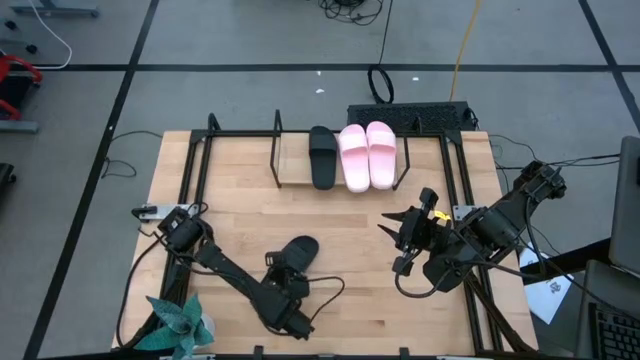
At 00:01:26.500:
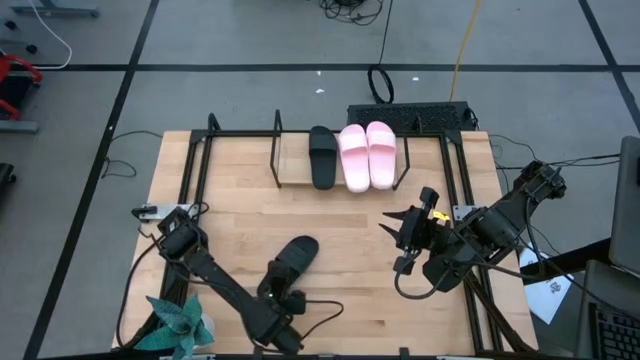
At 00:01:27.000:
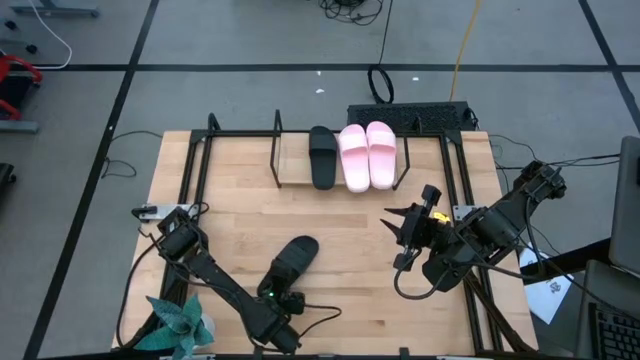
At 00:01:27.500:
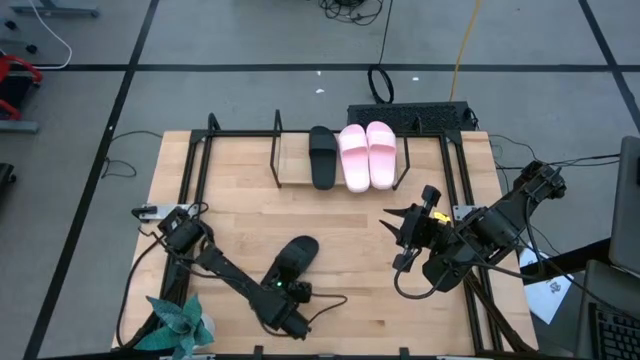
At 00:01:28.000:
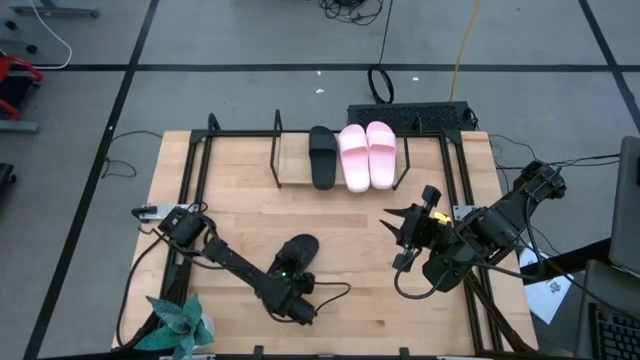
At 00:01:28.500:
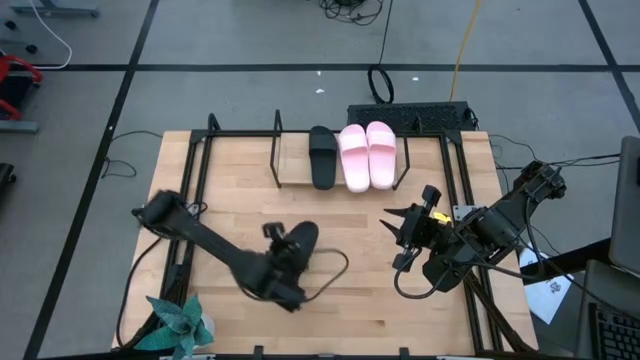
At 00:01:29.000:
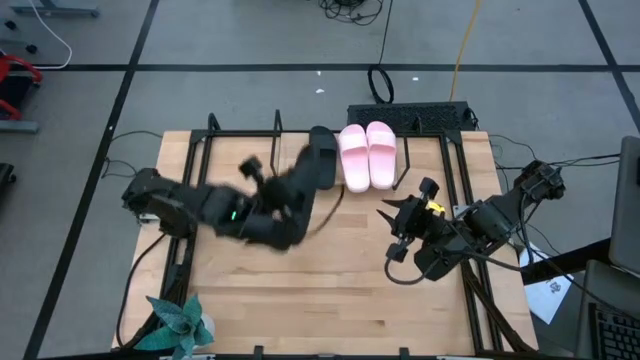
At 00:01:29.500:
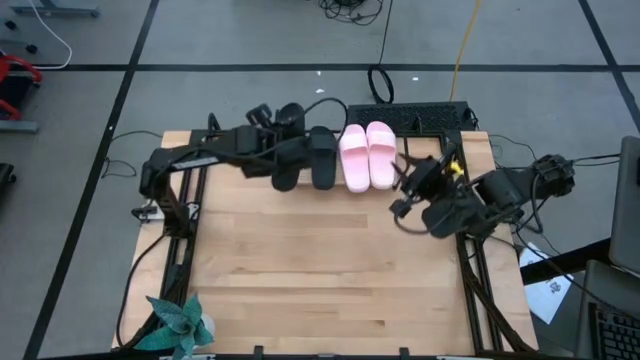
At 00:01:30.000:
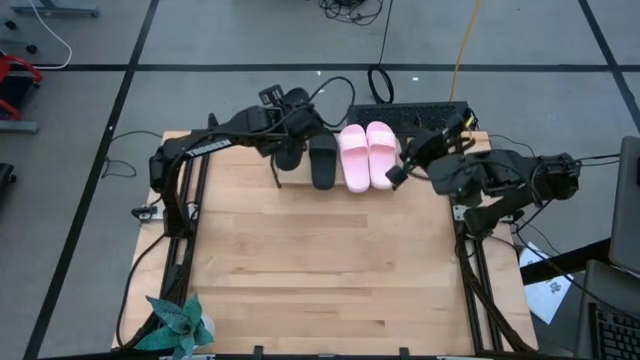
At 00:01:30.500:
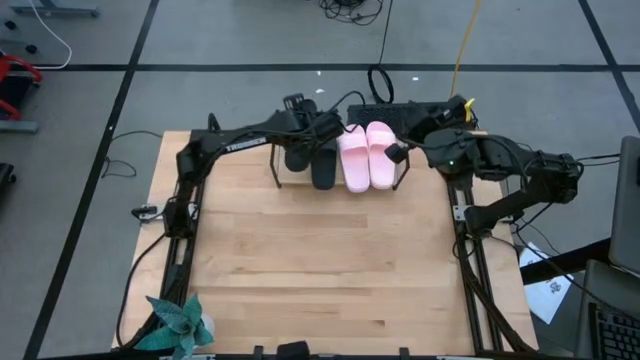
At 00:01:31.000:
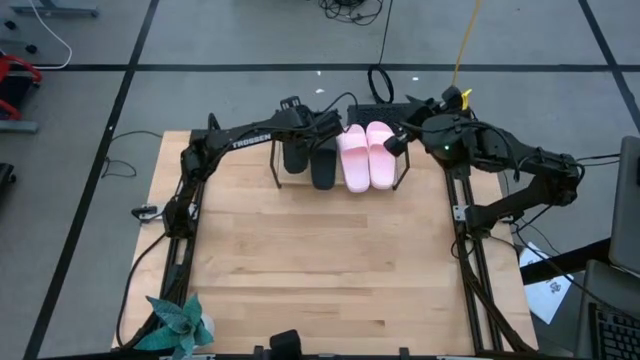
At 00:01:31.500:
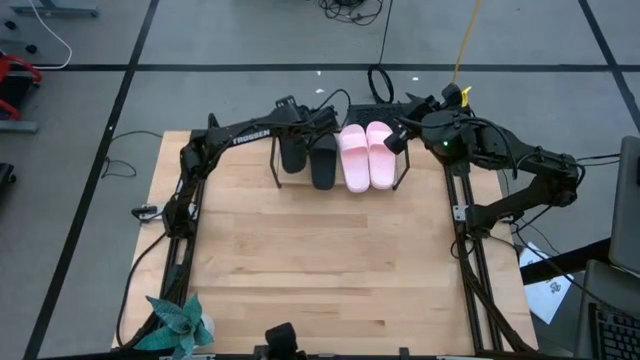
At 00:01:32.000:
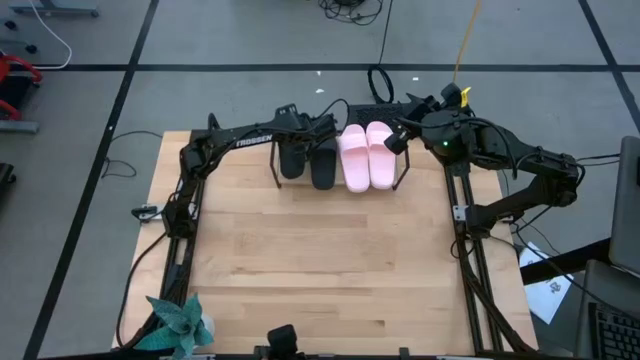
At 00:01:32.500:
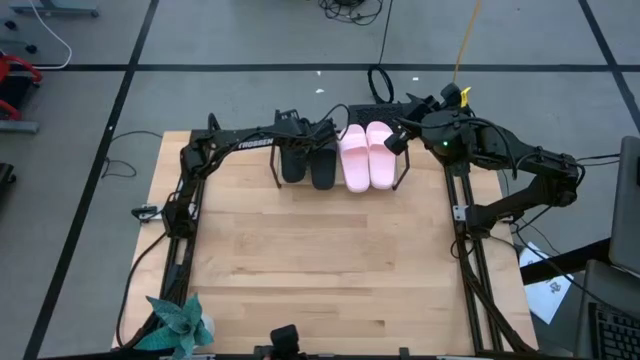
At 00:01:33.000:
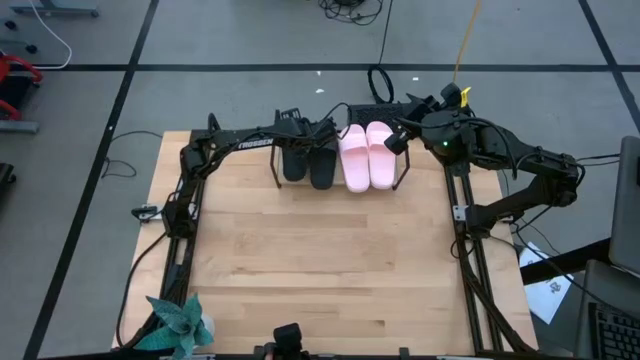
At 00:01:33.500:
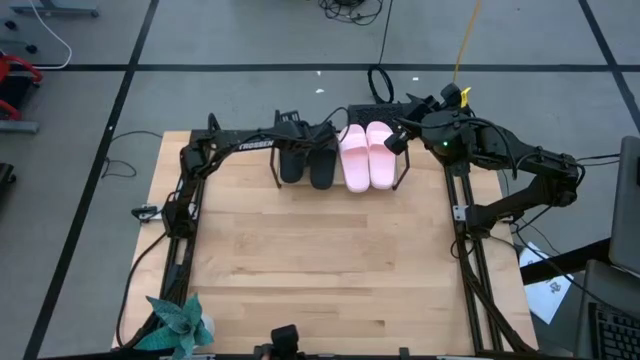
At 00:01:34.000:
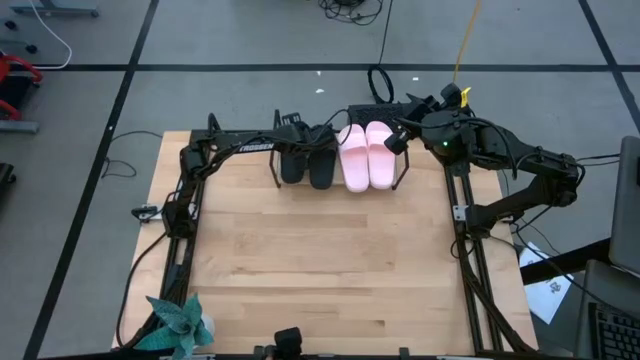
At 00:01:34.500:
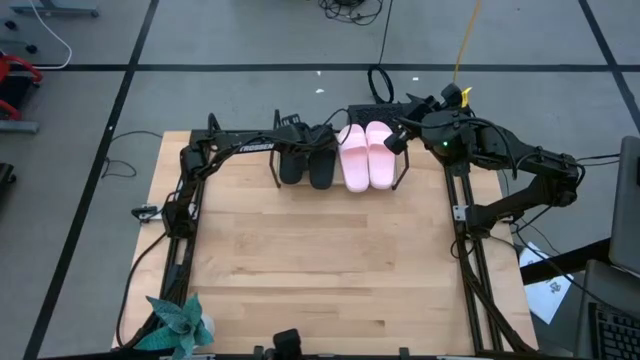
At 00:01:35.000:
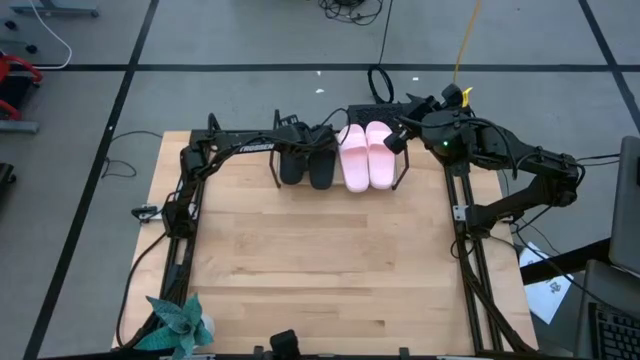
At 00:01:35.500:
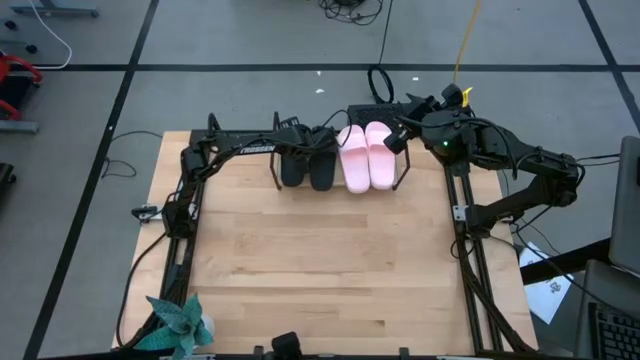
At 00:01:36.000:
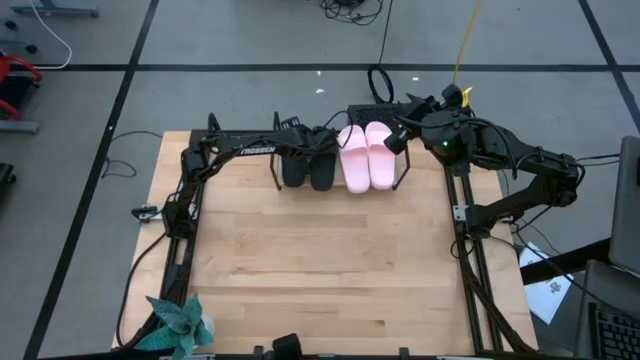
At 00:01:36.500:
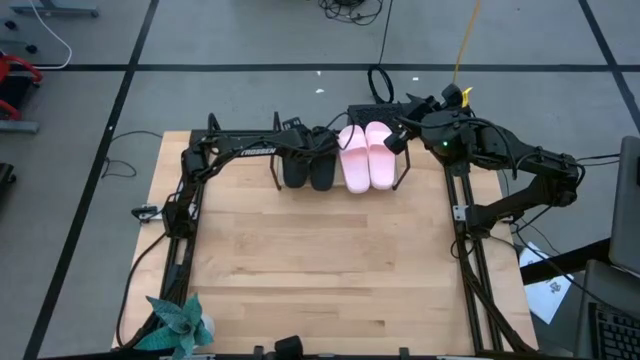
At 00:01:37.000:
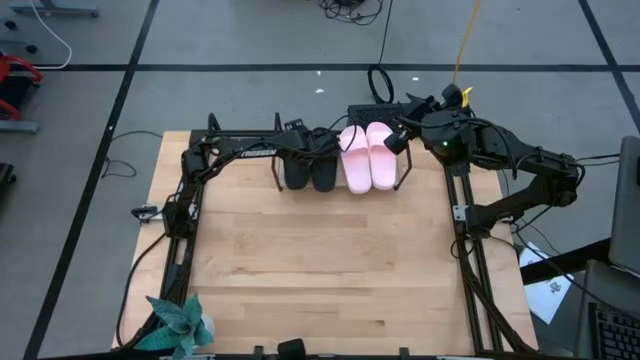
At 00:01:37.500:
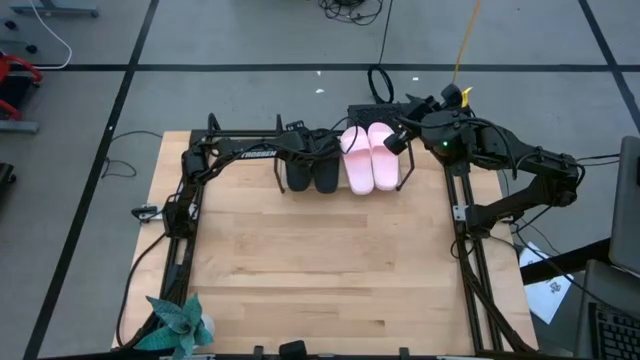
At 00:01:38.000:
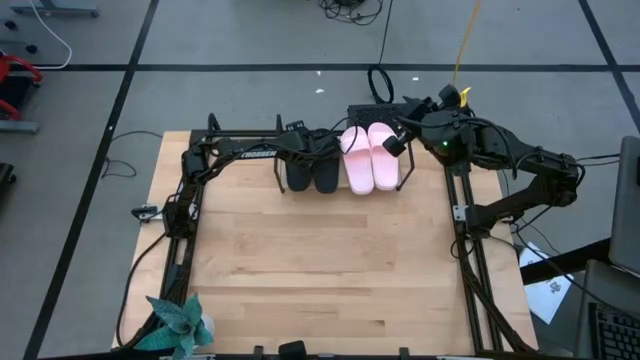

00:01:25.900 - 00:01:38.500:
Task: Pick and place slides into the shelf
Put the black slide on the shelf

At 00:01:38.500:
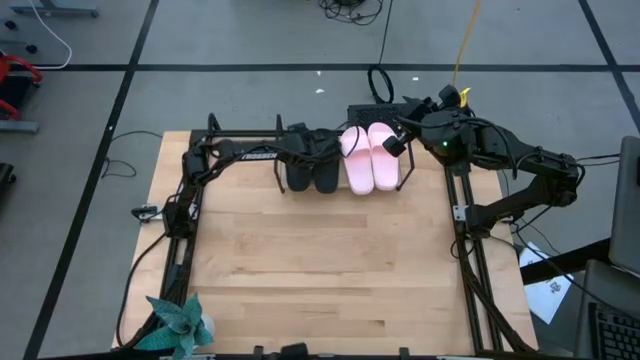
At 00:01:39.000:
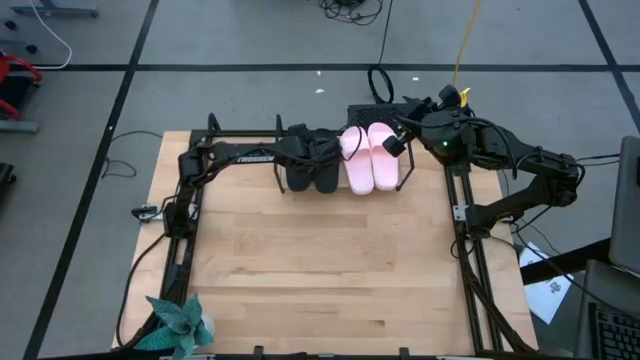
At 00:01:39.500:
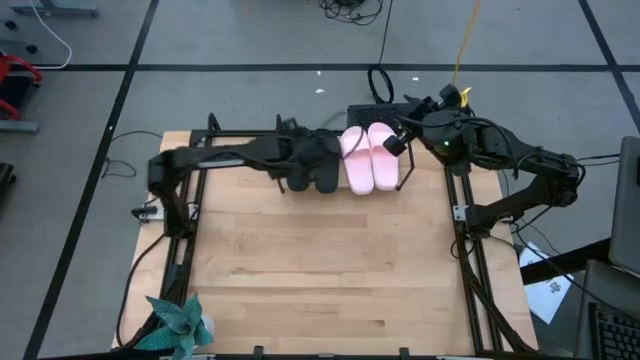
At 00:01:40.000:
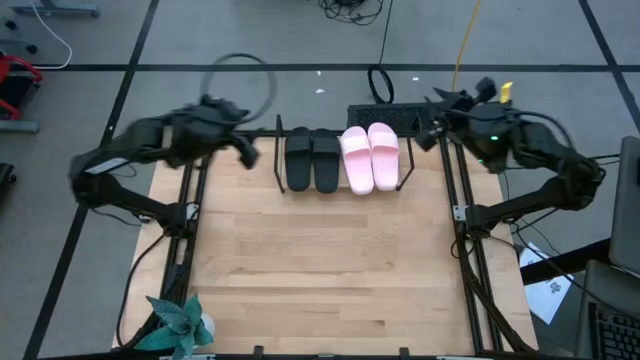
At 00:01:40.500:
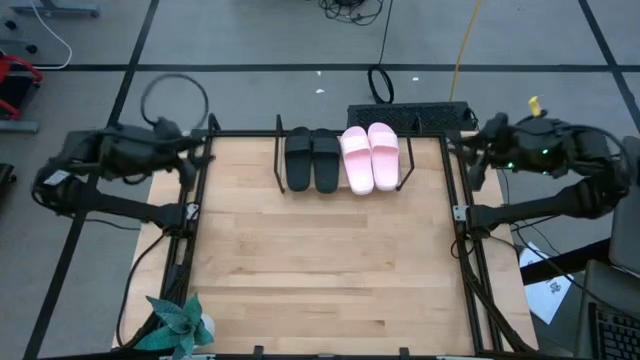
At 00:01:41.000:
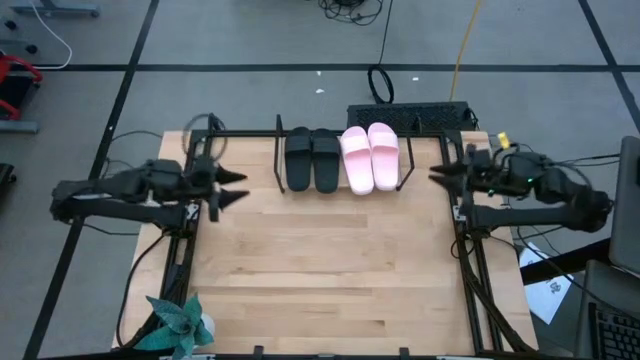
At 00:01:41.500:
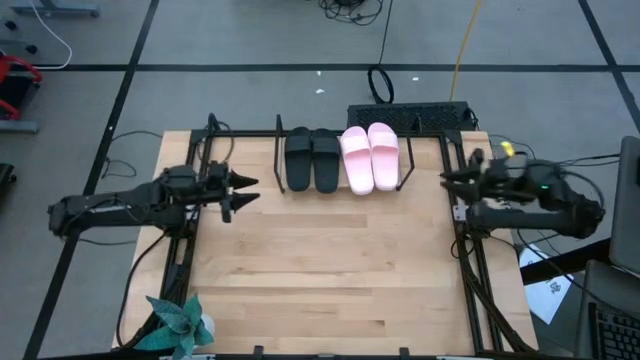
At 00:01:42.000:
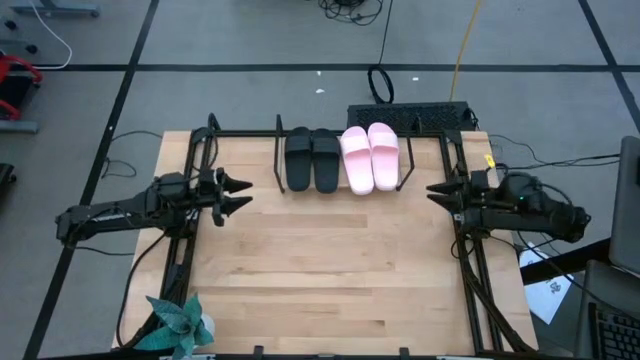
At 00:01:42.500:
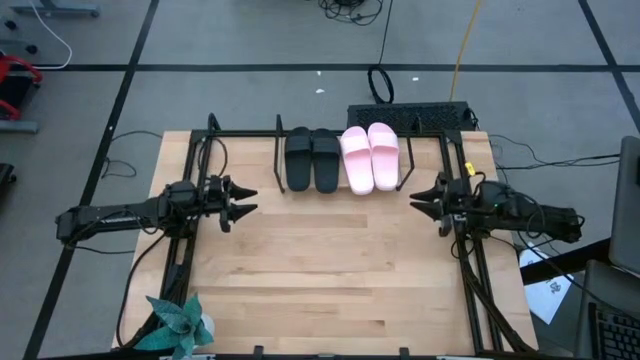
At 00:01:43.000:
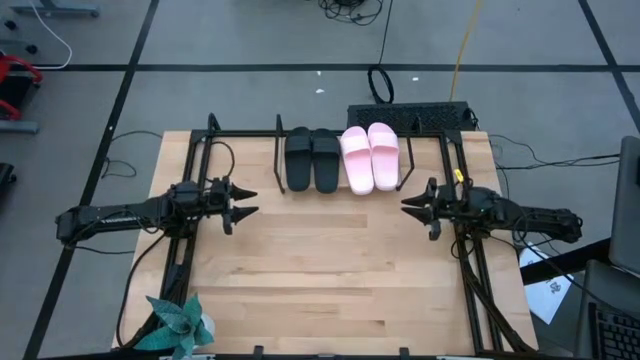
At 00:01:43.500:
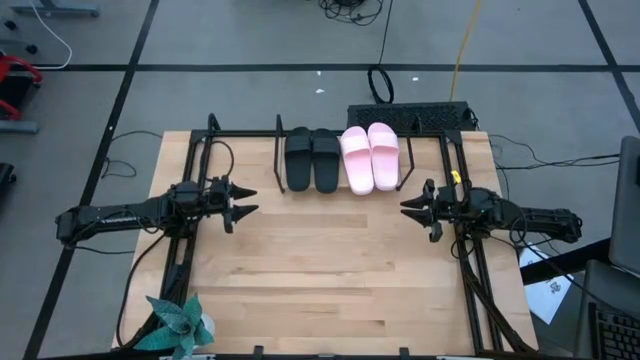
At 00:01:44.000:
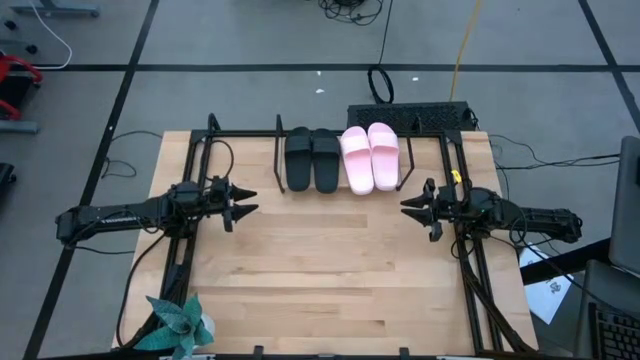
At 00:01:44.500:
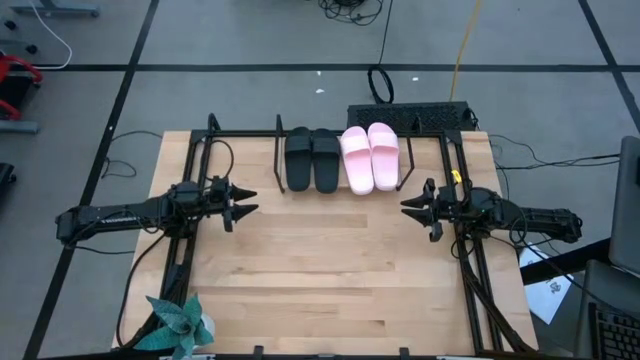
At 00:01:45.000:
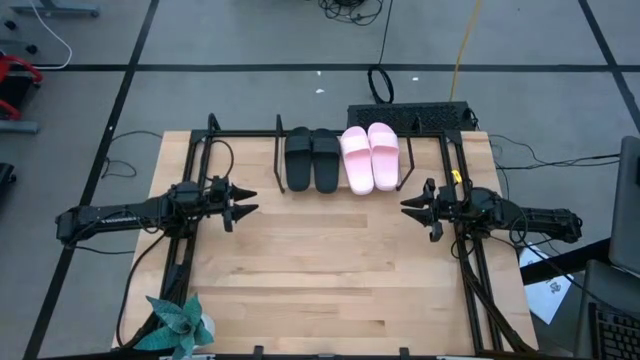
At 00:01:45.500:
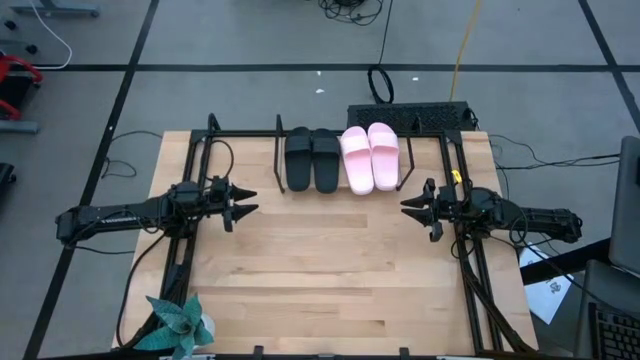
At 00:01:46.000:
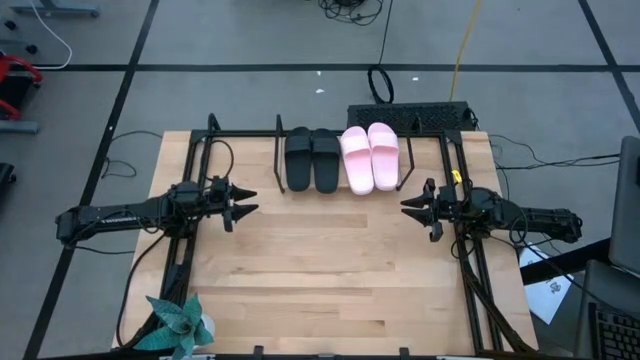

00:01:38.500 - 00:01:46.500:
Return to Home Position
